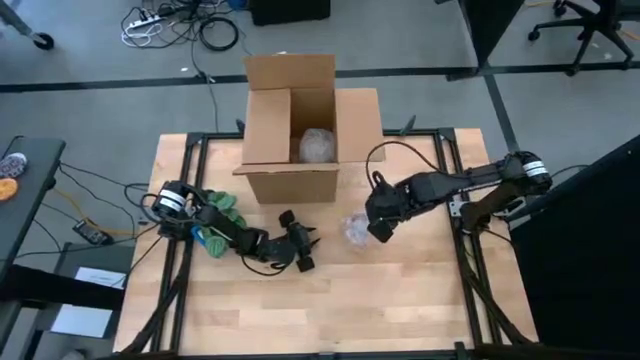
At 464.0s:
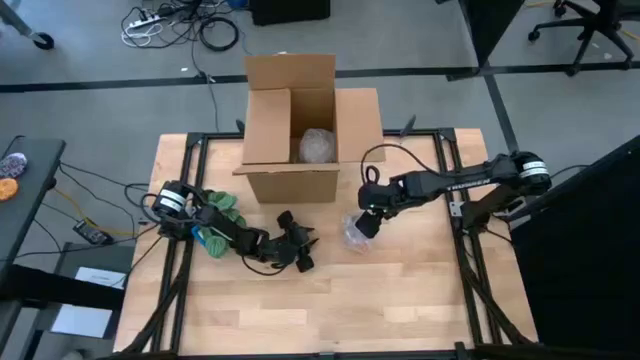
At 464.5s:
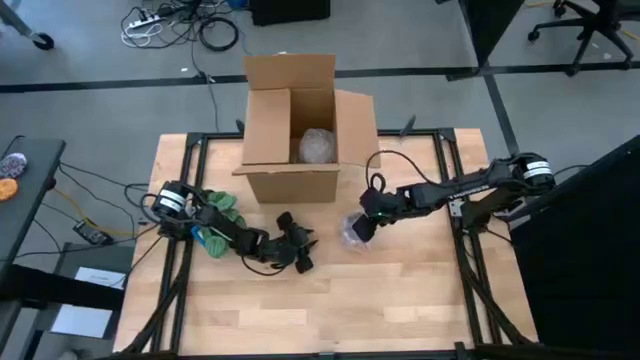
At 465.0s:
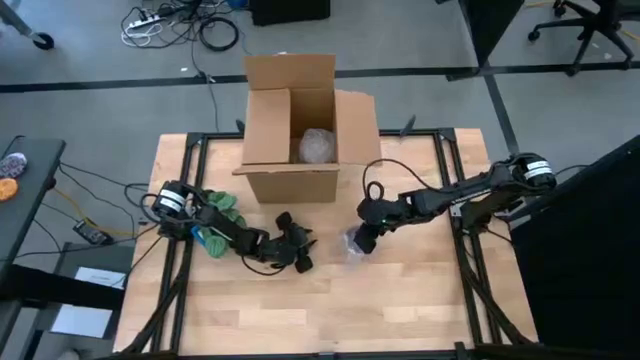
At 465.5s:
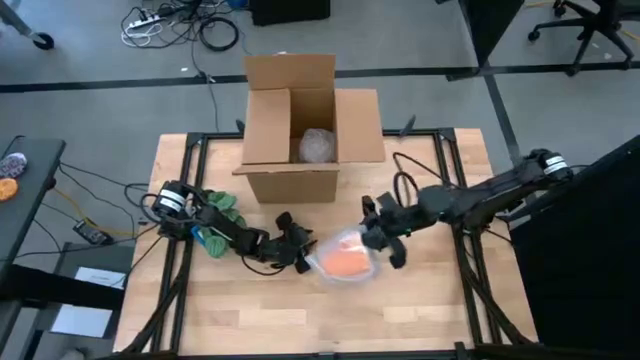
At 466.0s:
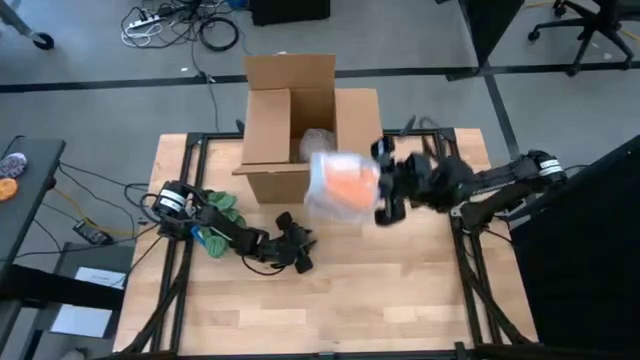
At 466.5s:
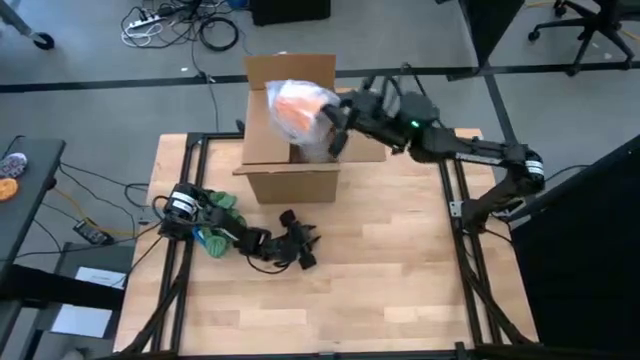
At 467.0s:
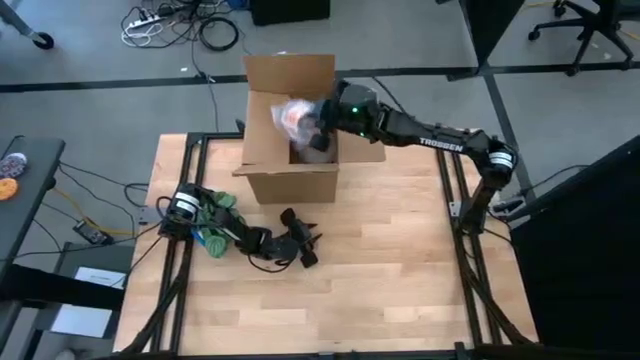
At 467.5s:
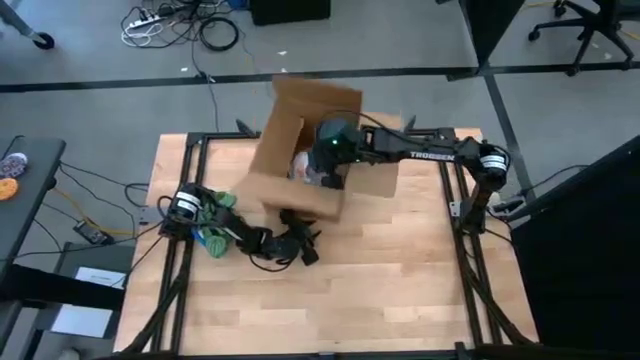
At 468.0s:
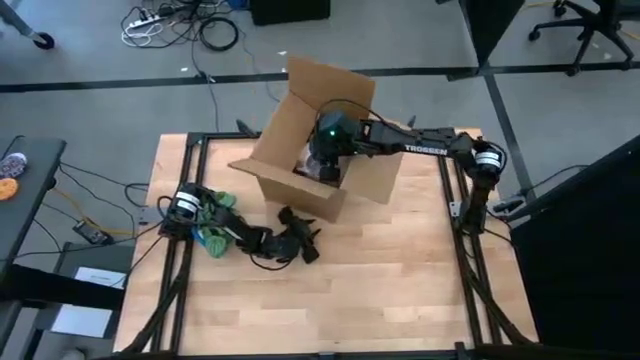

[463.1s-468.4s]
Task: wrap mug
Put the wrapped orange mug into the brown cardboard box

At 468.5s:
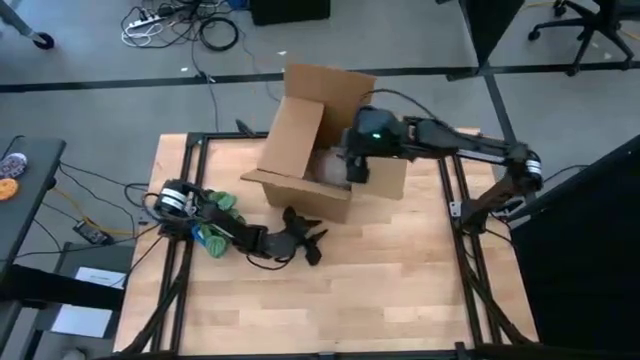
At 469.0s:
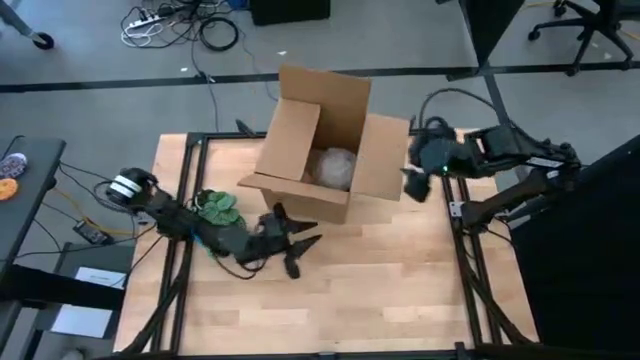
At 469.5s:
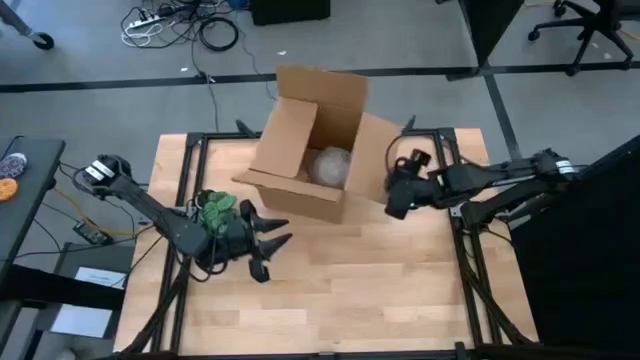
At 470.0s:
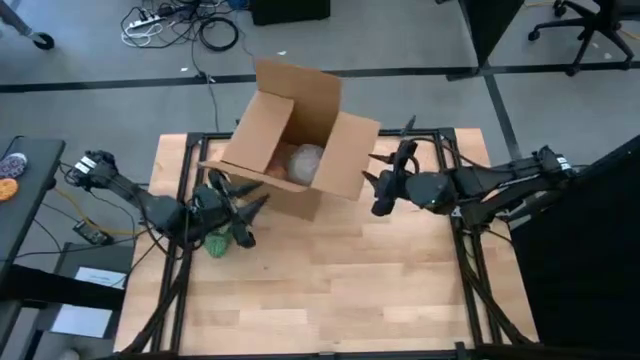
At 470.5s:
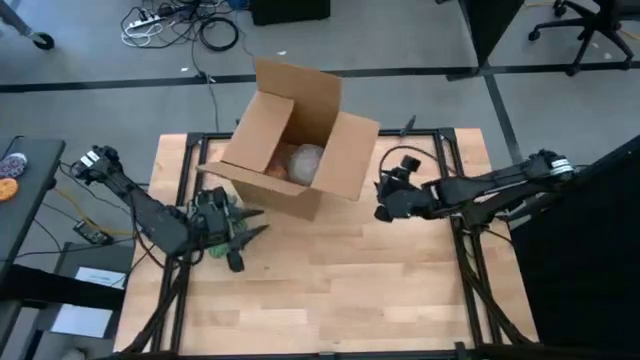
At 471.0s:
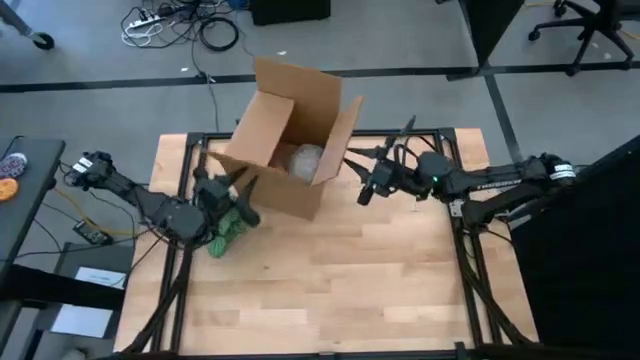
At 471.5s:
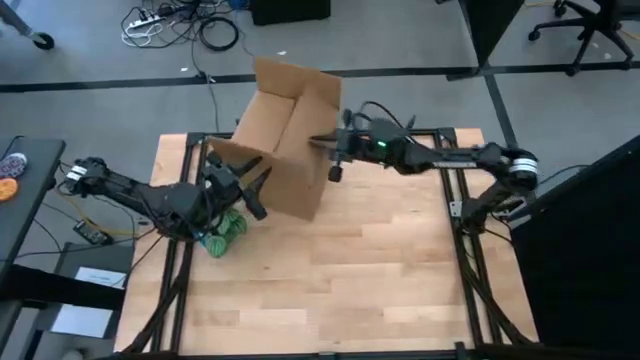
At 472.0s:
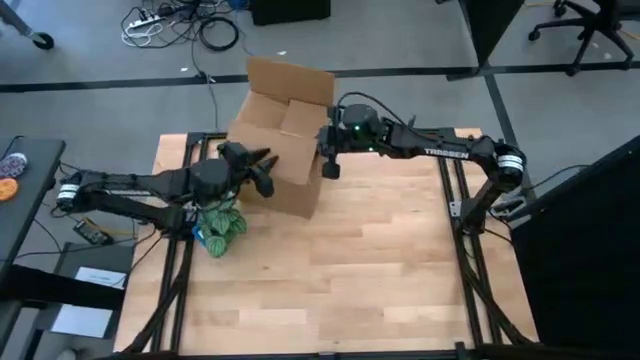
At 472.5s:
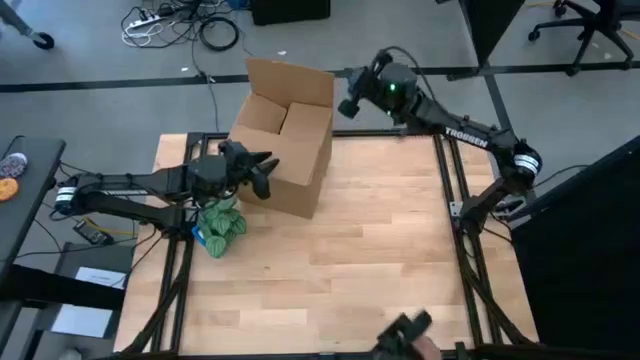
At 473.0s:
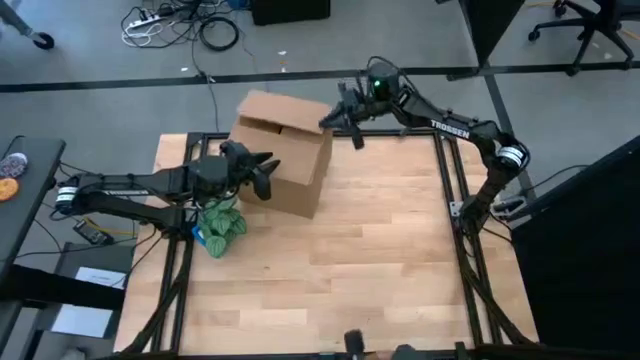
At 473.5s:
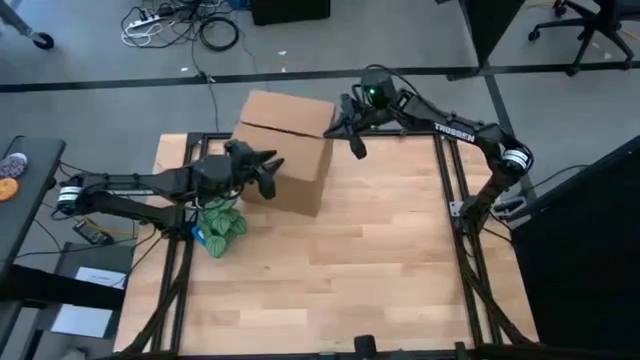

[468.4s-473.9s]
Close the brown cardboard box

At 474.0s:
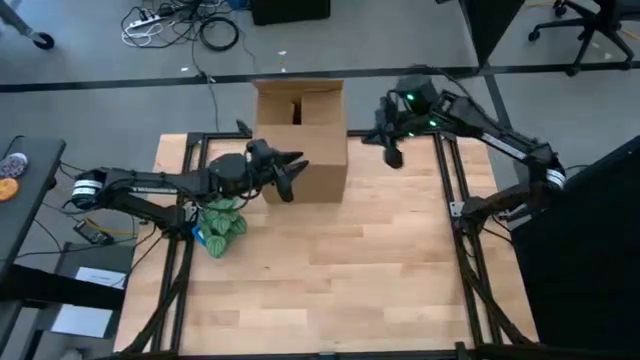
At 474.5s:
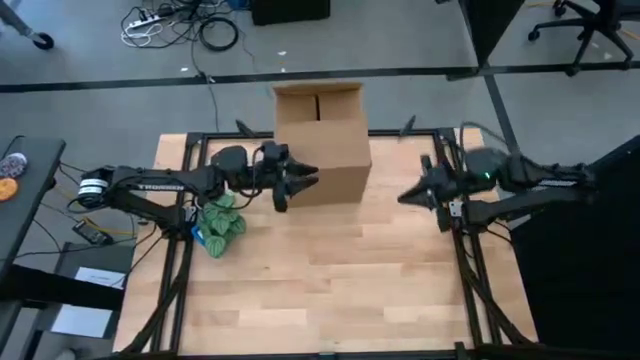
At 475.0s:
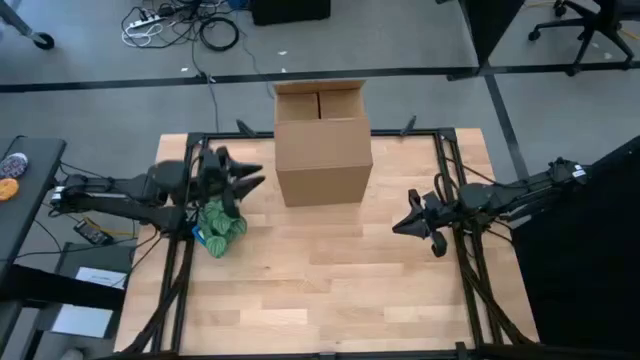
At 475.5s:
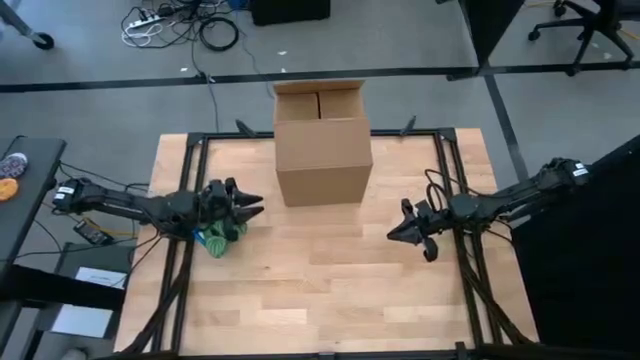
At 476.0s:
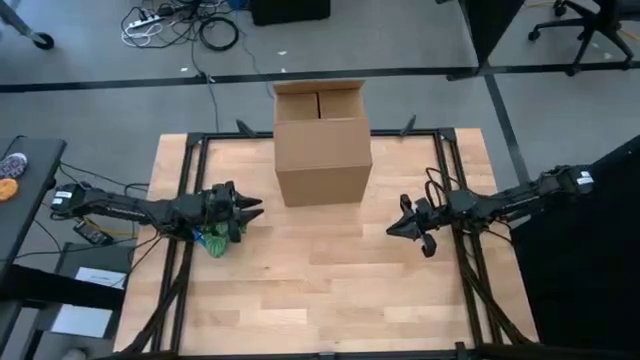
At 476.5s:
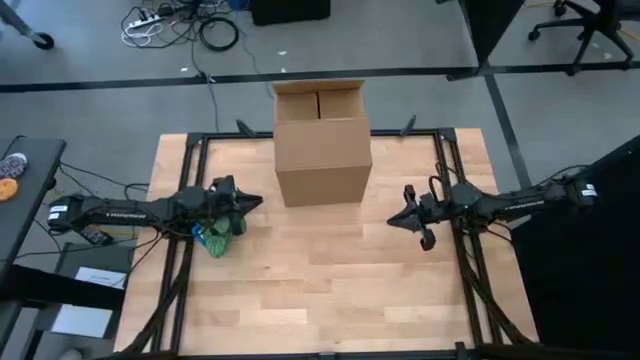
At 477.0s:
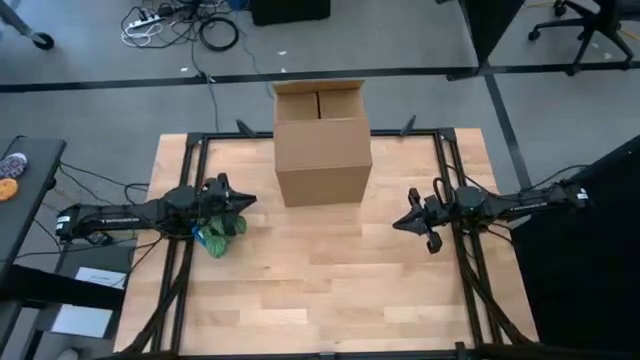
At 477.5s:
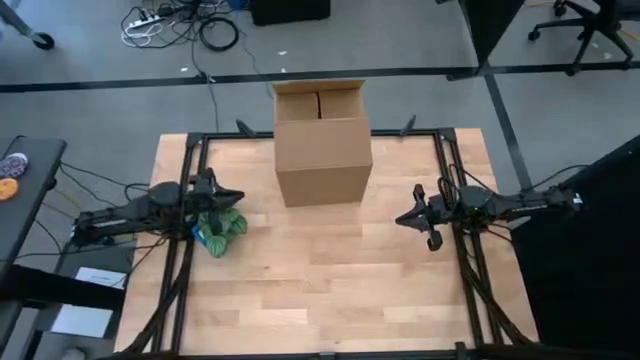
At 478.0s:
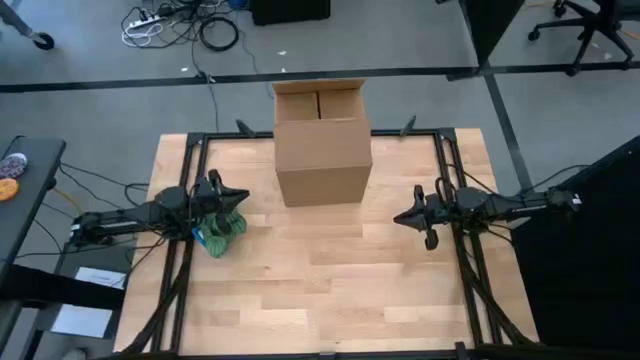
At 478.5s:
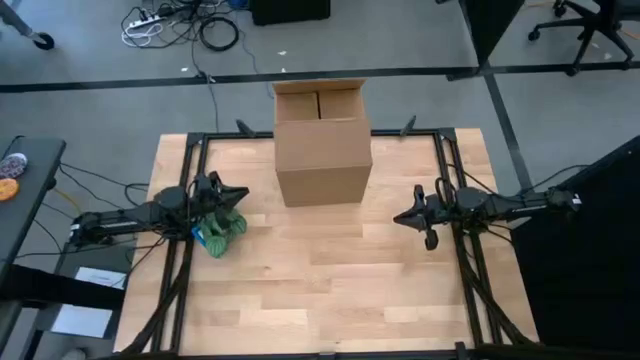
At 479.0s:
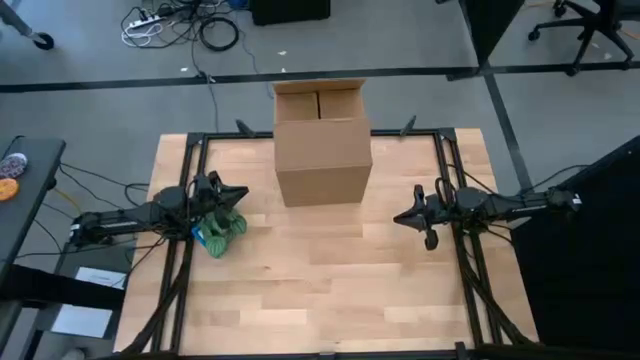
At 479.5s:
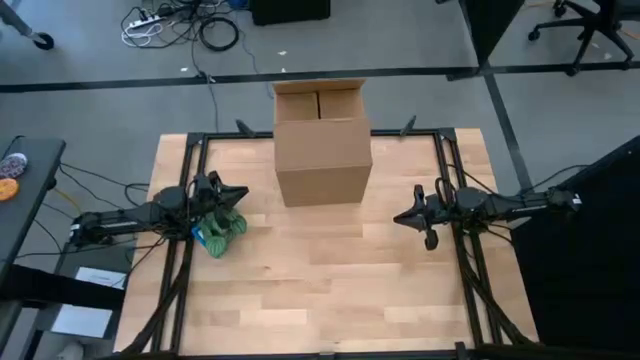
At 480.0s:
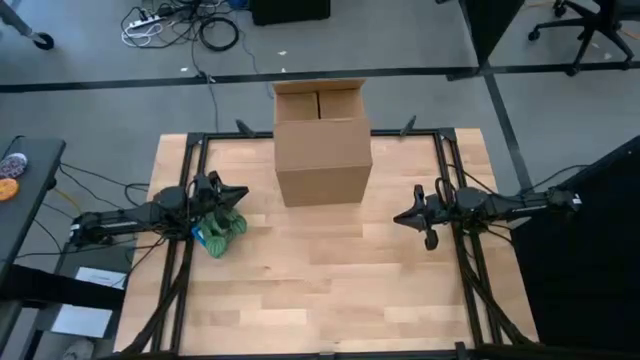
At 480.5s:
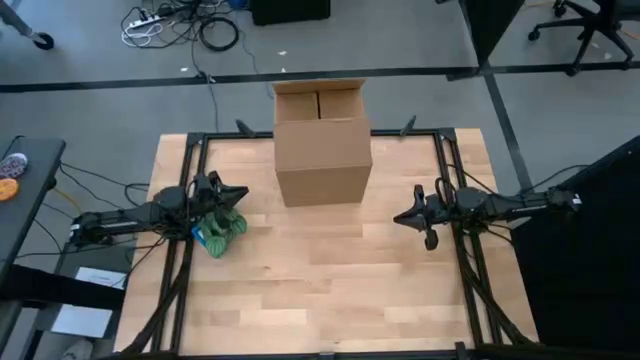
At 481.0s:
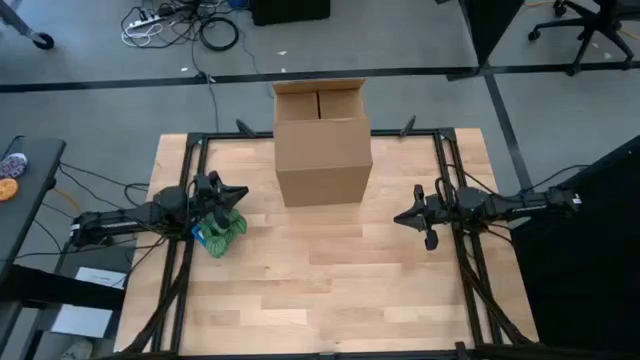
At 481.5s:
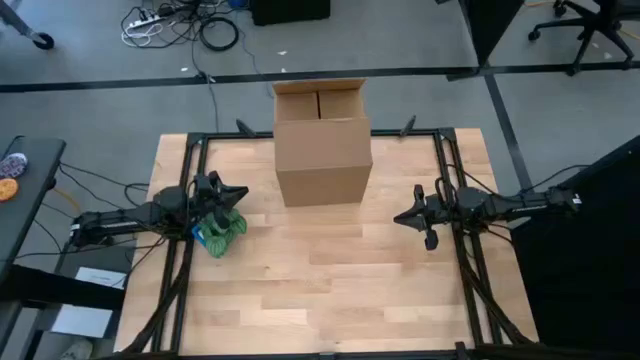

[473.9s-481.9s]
Return to Home Position

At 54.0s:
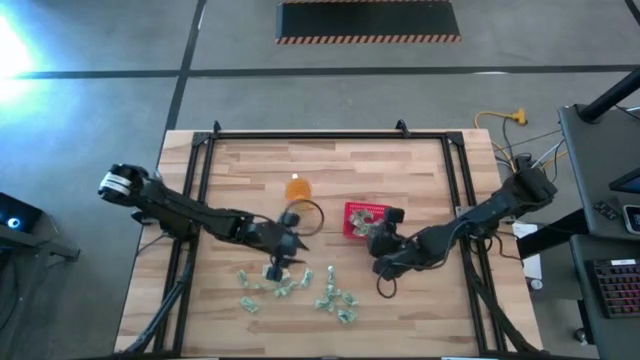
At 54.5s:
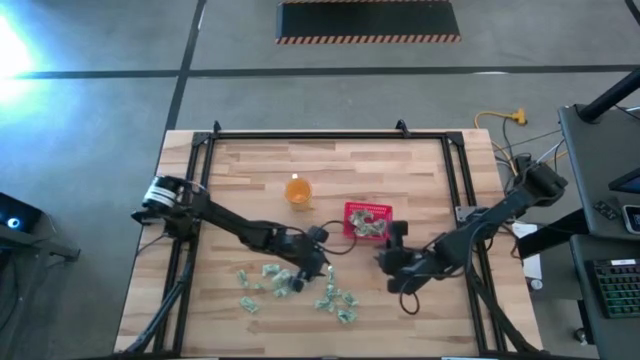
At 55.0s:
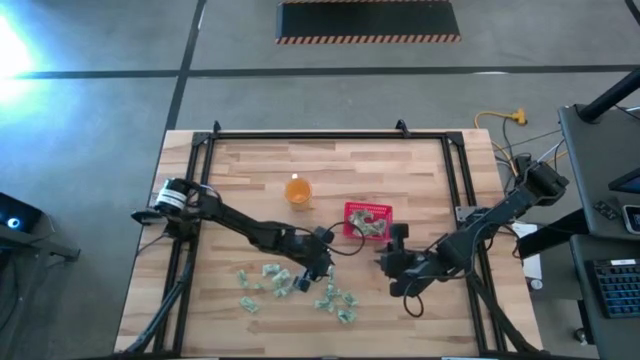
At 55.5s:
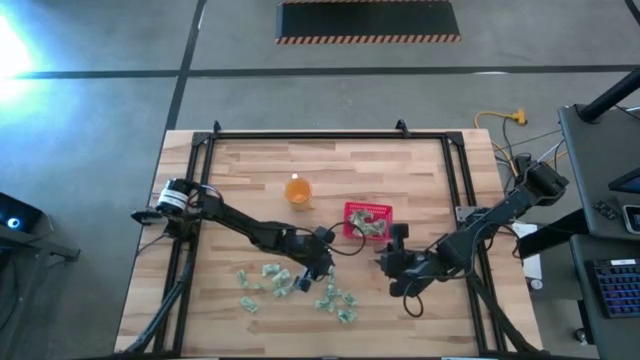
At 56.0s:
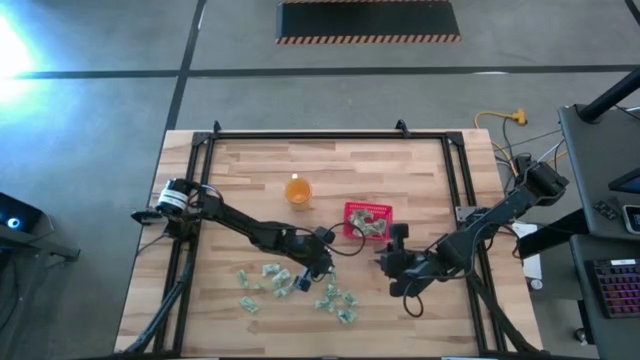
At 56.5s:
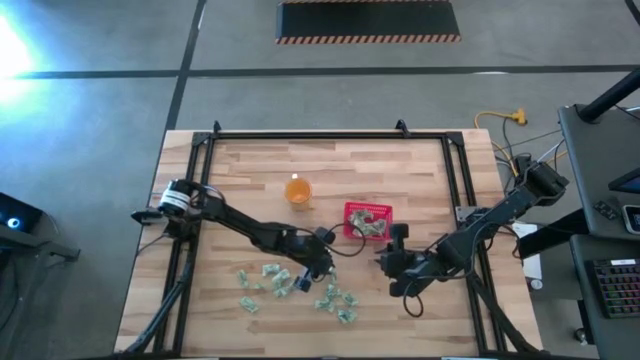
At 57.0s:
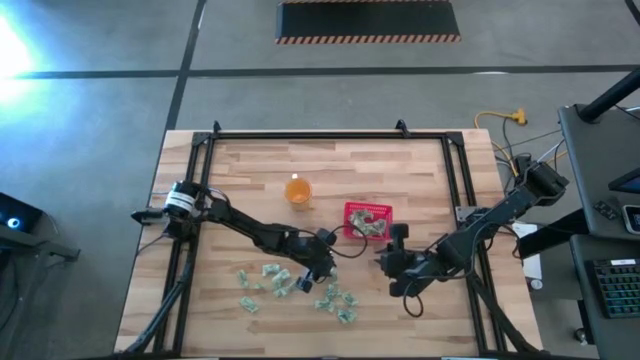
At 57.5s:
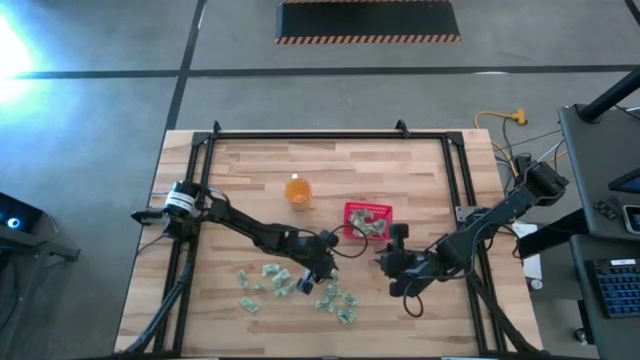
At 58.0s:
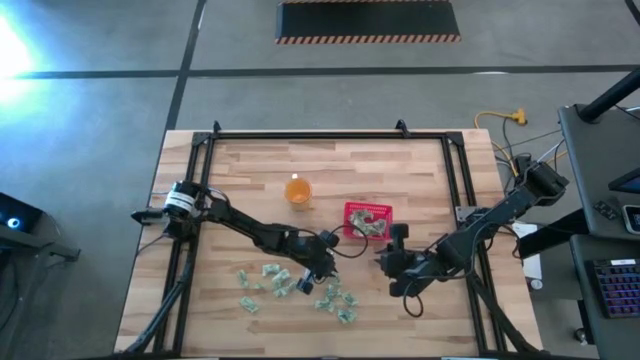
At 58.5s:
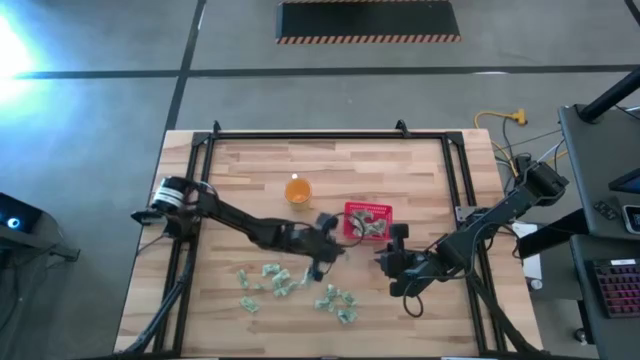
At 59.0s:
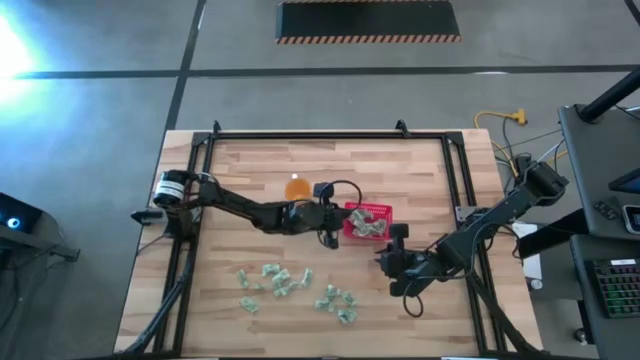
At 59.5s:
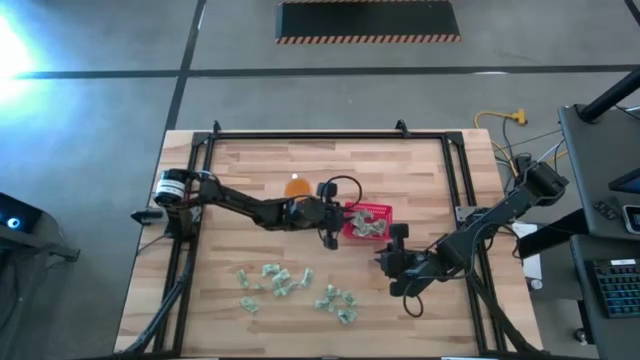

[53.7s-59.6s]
Task: Pick and place Stevia / Truvia into bins
Put the stevia packet into the basket
